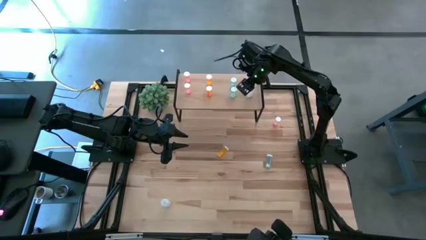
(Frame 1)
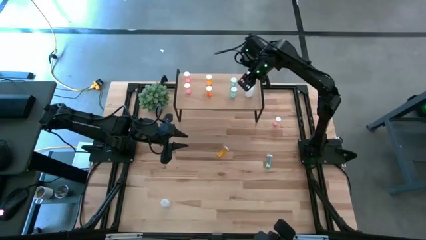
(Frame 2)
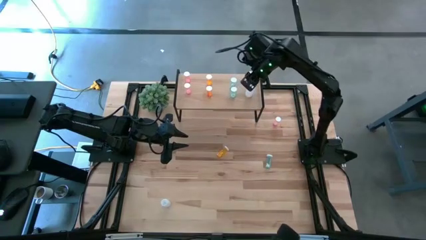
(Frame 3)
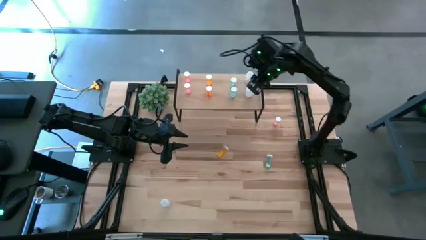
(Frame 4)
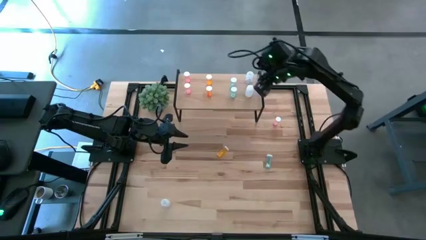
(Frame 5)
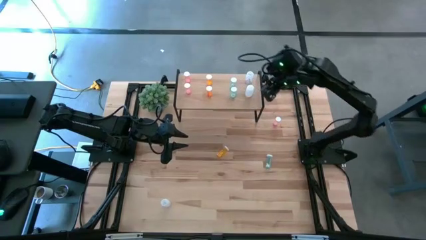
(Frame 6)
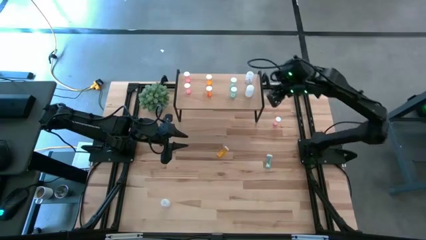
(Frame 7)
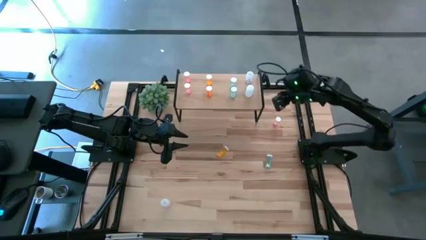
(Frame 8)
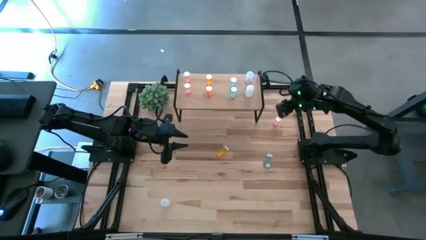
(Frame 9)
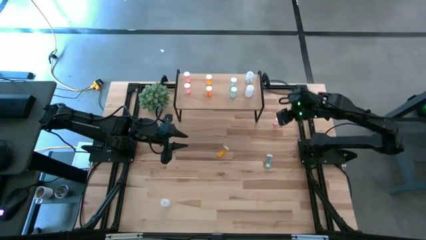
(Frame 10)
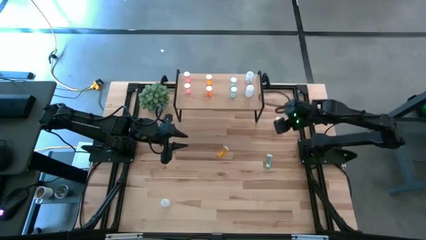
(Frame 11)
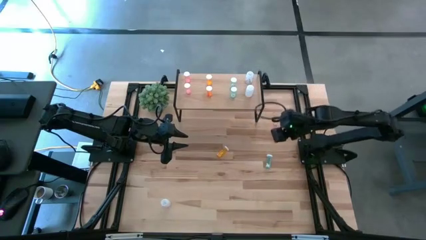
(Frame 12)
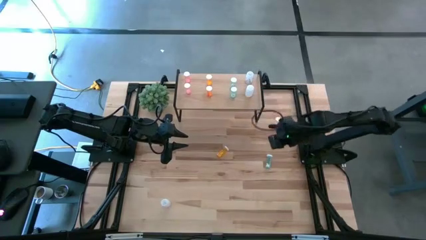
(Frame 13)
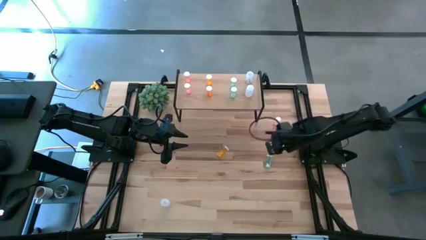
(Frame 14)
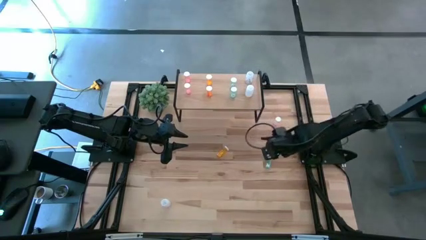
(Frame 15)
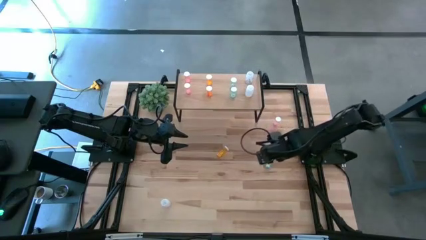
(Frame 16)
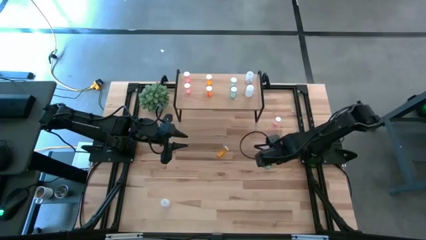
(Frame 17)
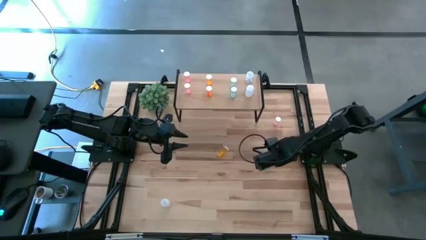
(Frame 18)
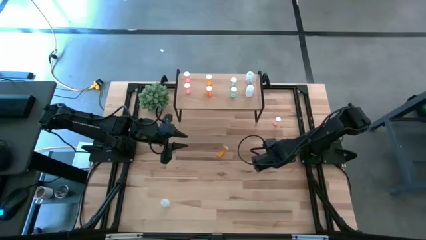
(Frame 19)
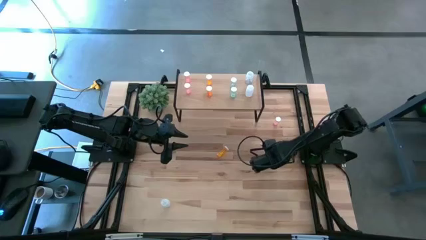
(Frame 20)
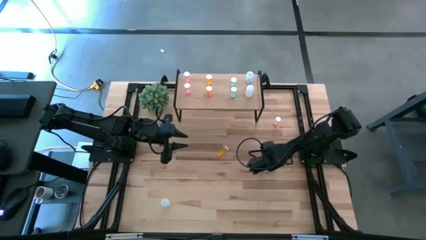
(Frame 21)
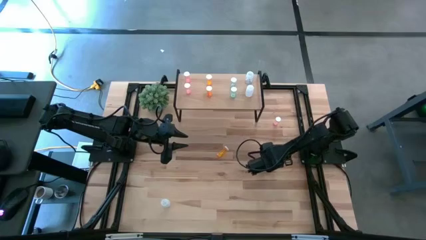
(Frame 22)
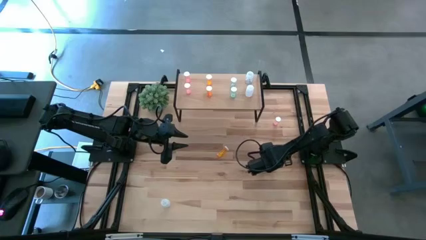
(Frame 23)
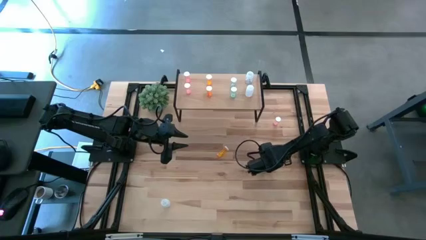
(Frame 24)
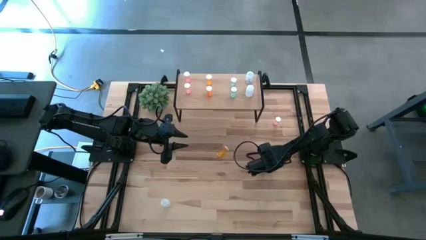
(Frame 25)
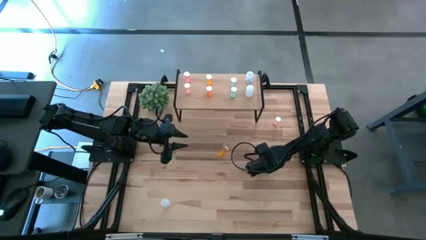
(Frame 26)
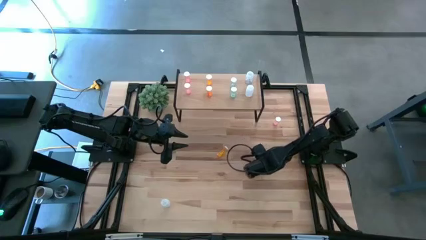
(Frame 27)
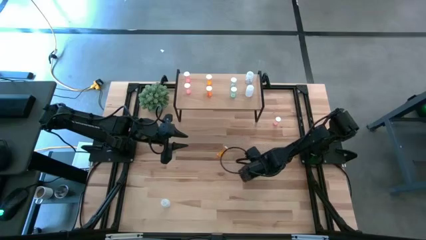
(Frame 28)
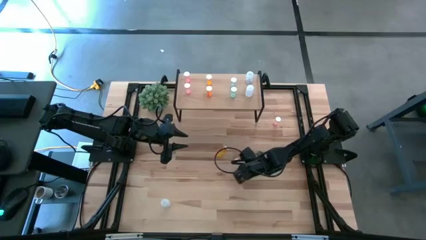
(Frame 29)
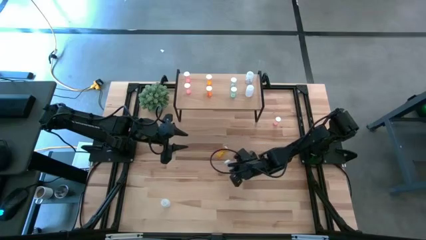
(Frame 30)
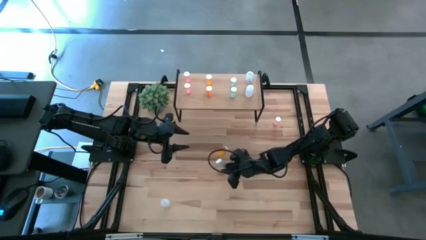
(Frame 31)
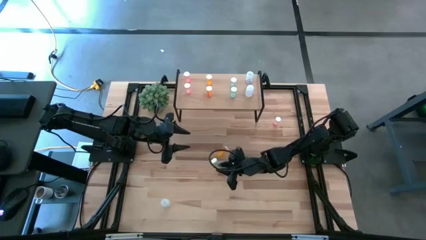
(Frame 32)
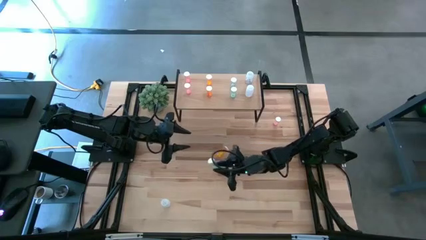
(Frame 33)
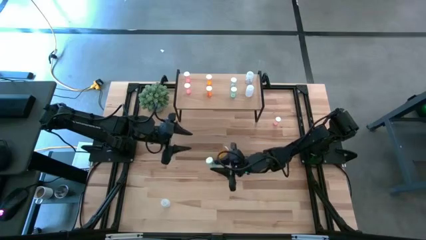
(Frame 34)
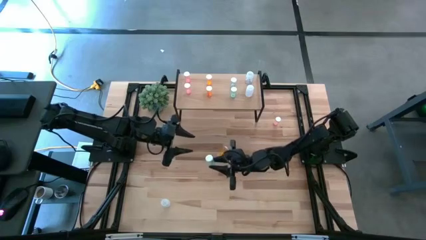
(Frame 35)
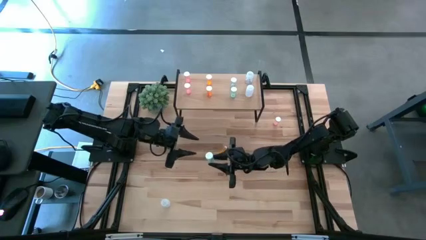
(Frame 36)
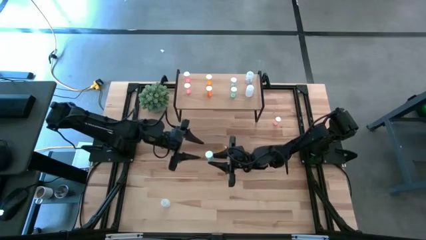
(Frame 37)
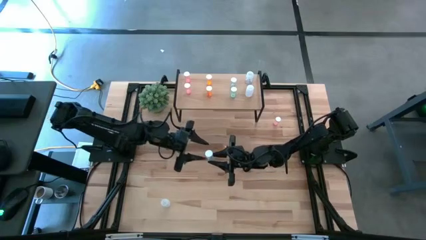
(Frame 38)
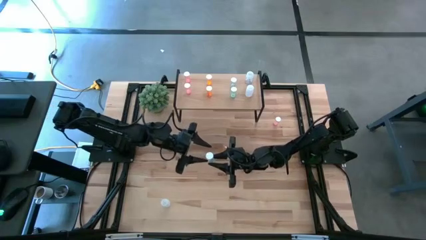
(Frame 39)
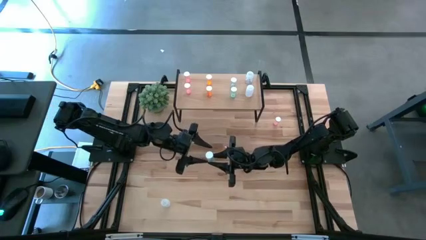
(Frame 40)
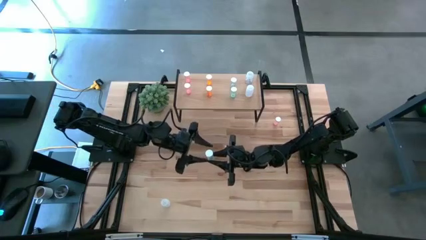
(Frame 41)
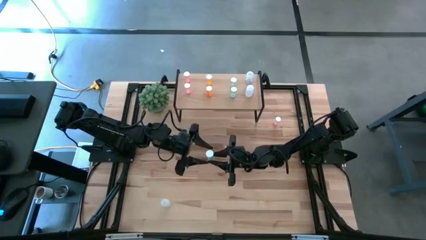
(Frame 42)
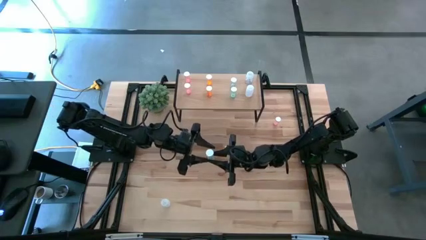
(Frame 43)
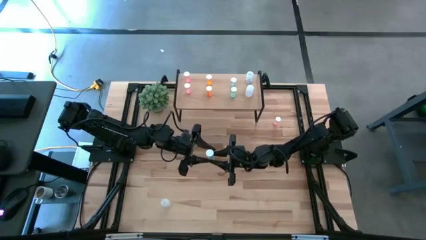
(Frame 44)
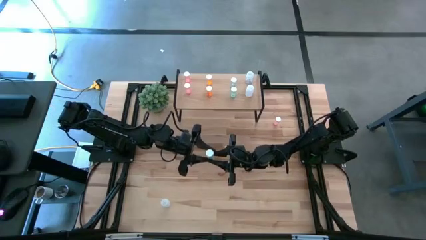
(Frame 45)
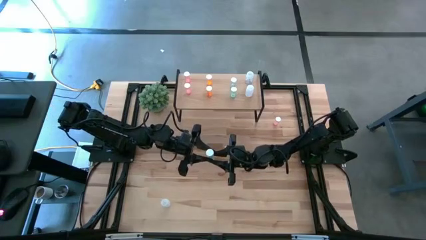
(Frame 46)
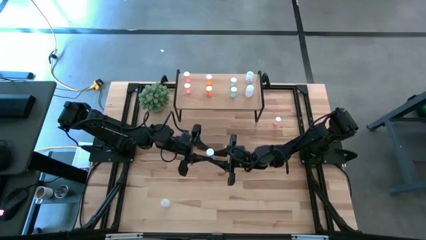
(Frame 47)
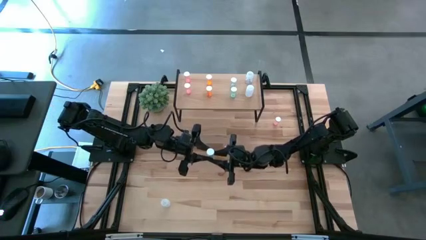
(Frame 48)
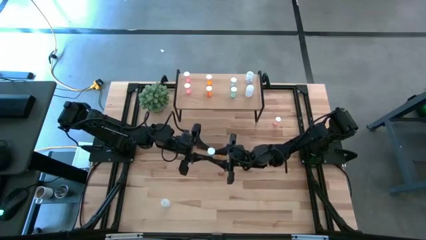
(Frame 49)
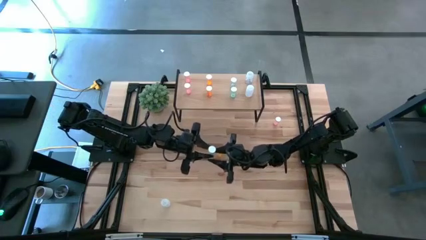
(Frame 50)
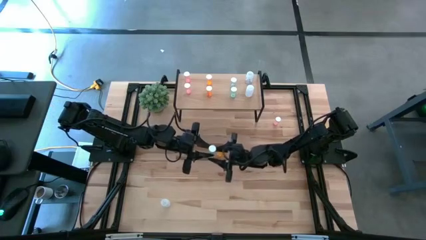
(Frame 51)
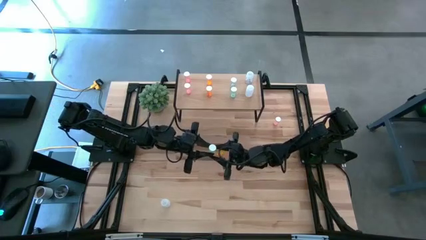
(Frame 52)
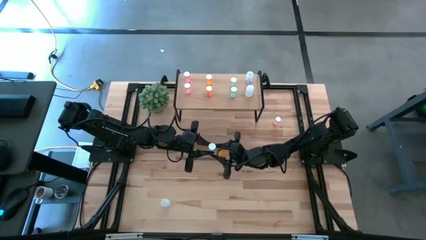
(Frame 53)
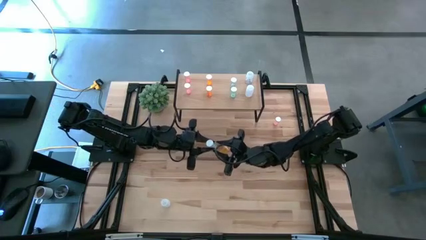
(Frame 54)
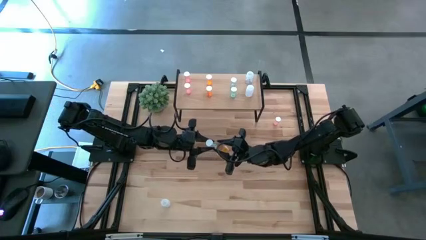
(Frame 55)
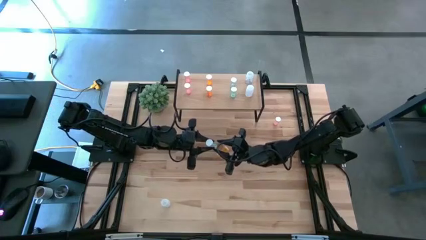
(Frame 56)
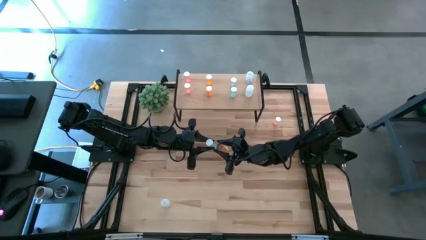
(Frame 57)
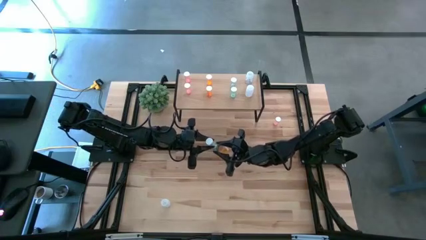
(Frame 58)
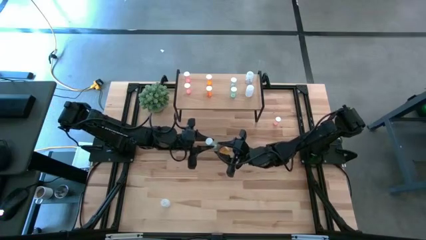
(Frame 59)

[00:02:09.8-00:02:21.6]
Task: Pick and place medicine bottles onto shelf by color
Put the blue pill bottle on the shelf aligned with the other blue pill bottles

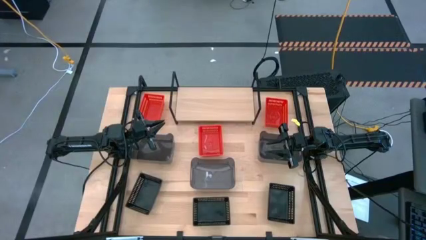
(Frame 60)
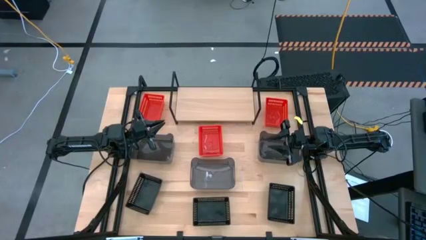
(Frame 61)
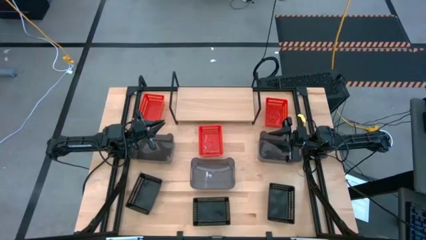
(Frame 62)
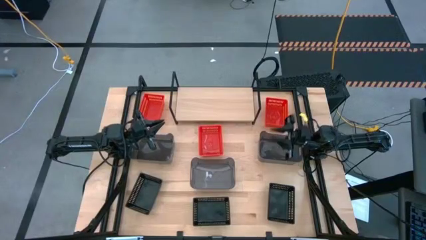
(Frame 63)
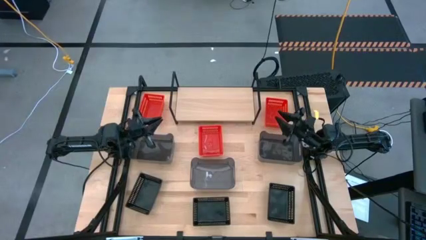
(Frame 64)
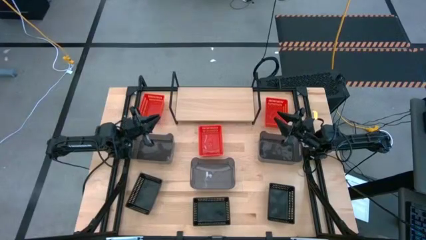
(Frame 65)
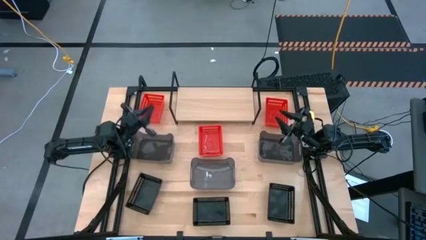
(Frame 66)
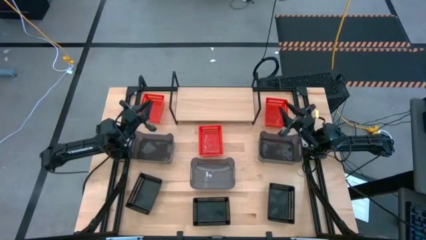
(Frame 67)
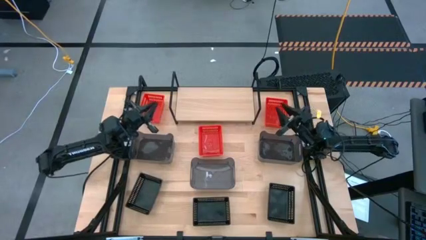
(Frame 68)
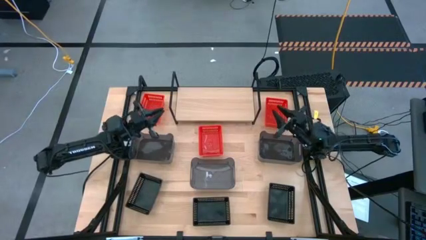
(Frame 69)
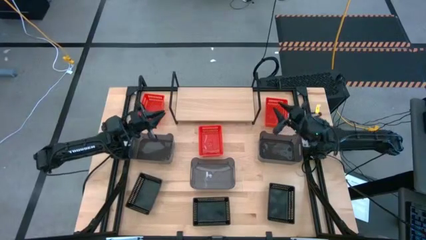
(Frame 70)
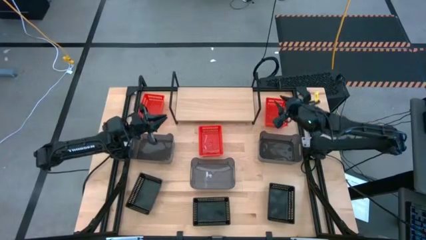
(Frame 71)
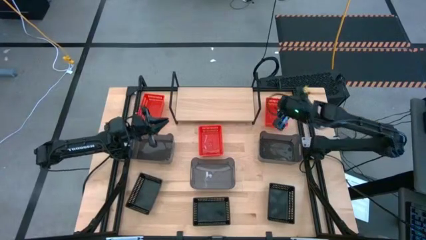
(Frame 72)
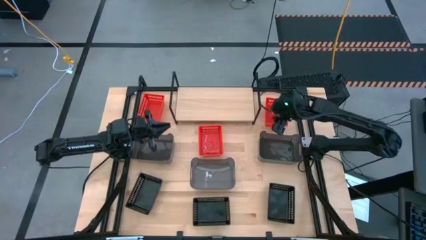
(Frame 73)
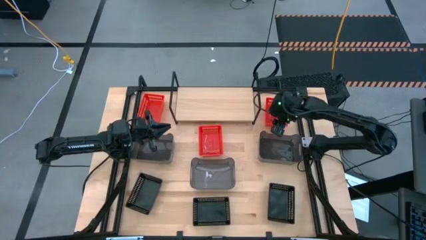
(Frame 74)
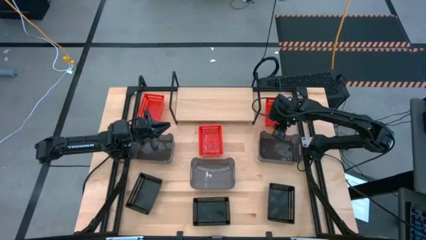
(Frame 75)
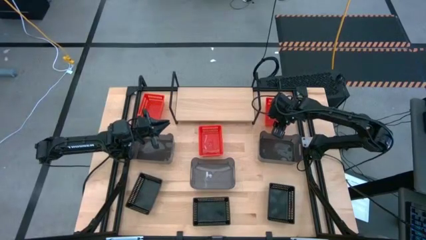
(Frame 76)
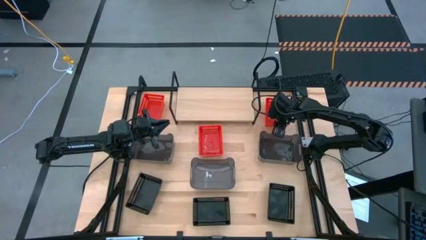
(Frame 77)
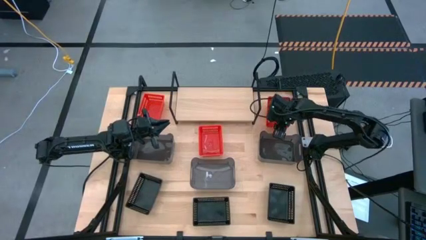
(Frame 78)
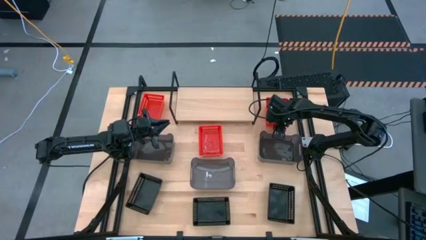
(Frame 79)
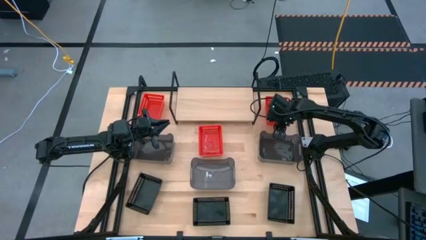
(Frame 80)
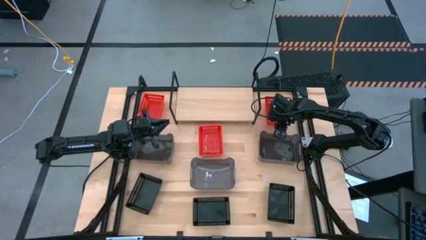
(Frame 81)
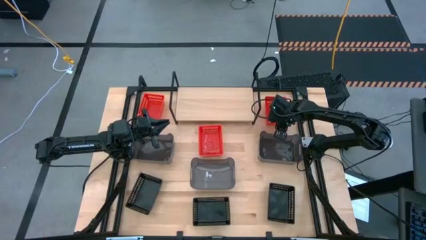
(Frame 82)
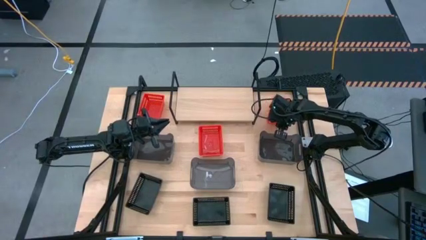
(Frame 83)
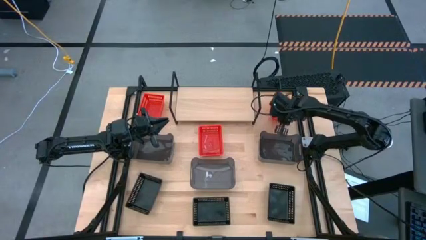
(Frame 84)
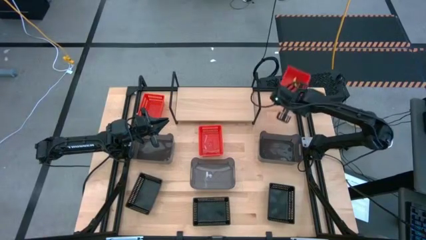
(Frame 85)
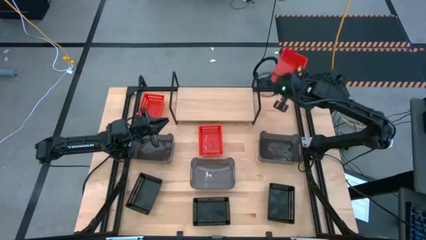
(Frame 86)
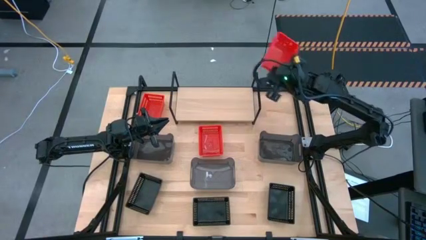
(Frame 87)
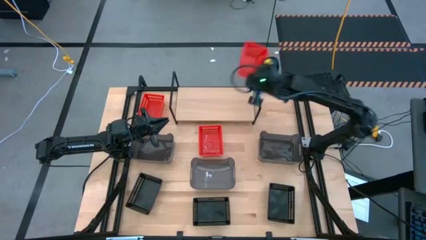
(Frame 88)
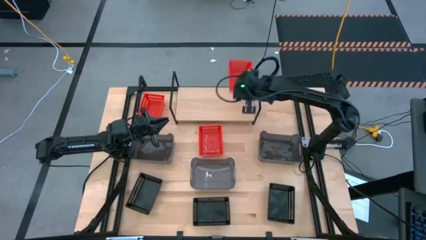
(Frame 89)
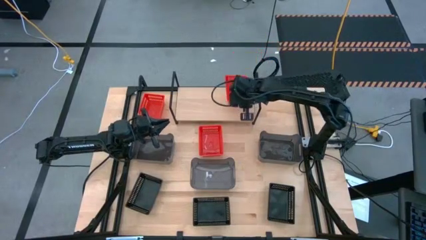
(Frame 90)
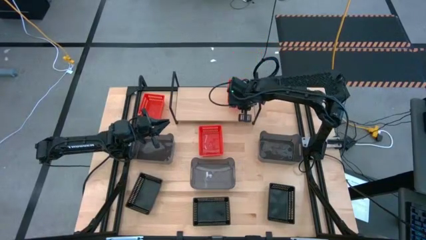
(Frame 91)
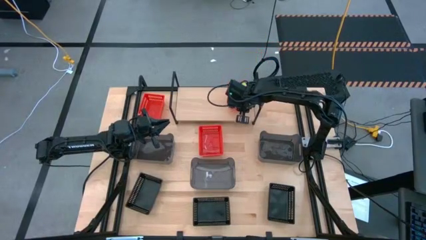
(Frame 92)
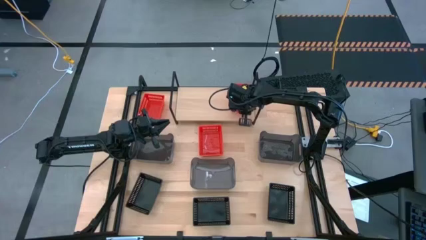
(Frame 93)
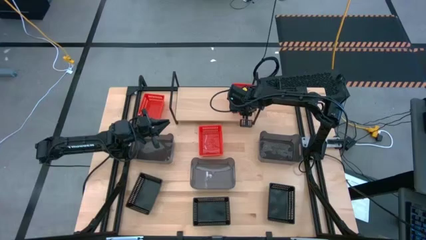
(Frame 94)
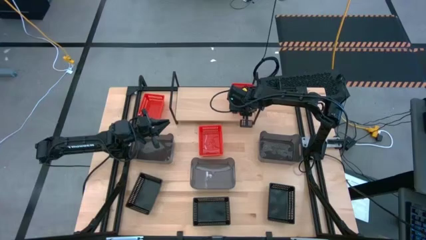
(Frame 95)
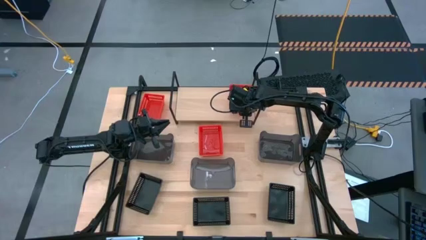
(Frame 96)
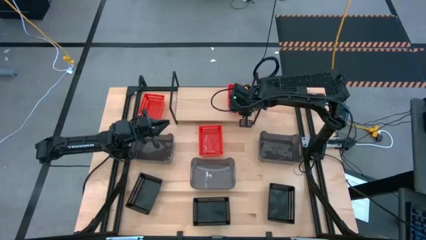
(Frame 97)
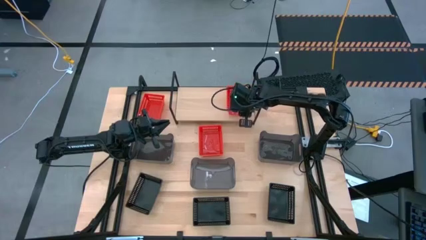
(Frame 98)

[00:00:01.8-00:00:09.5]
Task: Stack baskets on shelf by color
Put the top right red bin on the shelf
